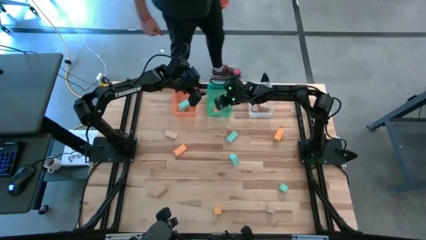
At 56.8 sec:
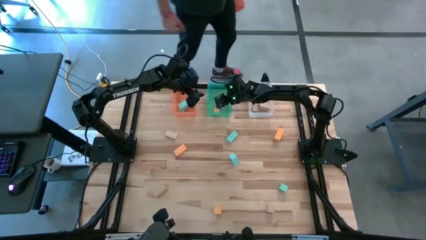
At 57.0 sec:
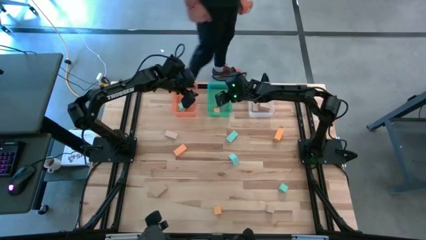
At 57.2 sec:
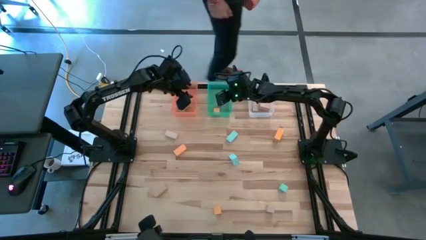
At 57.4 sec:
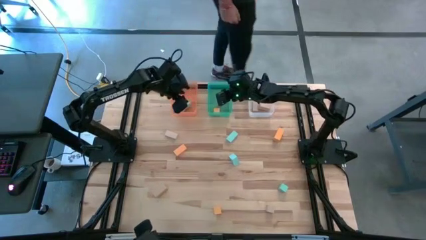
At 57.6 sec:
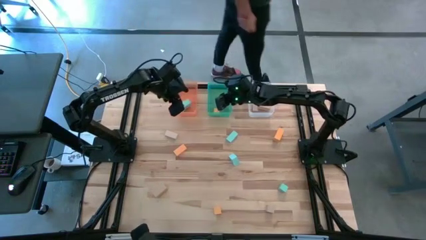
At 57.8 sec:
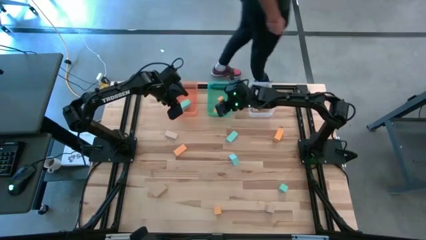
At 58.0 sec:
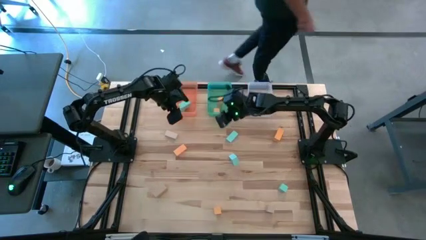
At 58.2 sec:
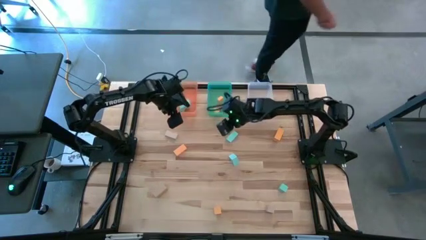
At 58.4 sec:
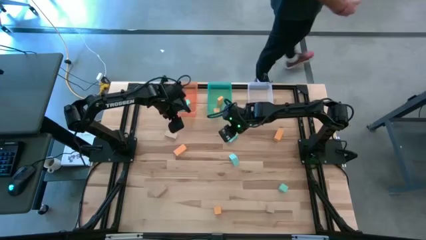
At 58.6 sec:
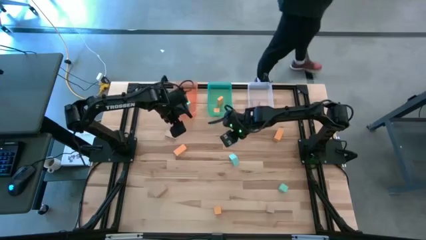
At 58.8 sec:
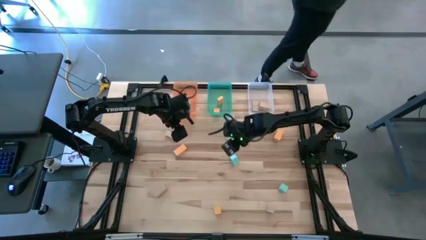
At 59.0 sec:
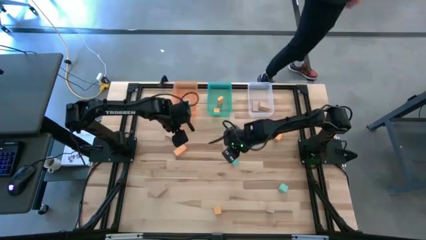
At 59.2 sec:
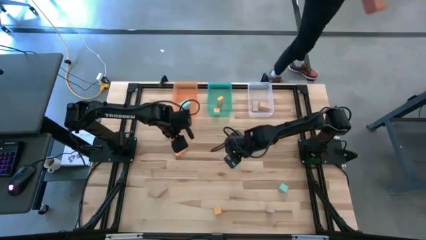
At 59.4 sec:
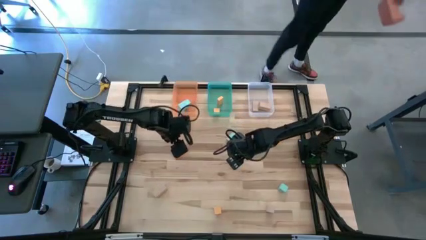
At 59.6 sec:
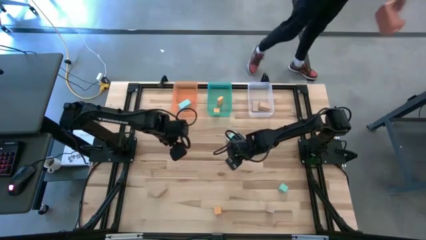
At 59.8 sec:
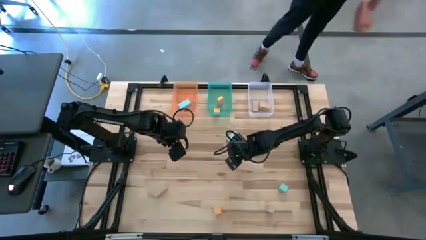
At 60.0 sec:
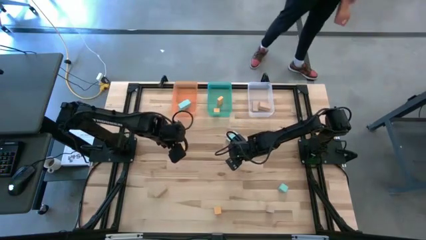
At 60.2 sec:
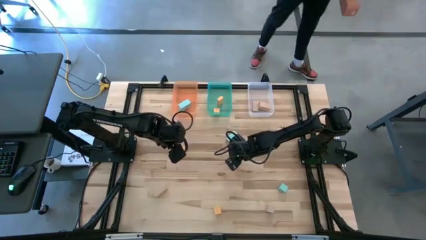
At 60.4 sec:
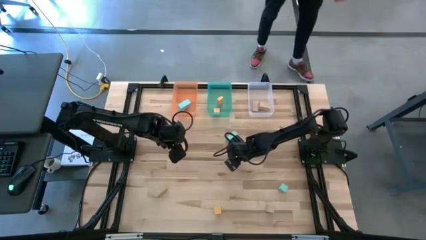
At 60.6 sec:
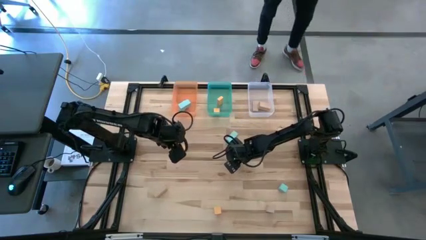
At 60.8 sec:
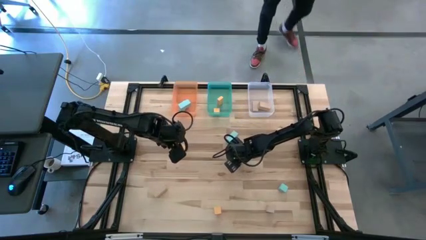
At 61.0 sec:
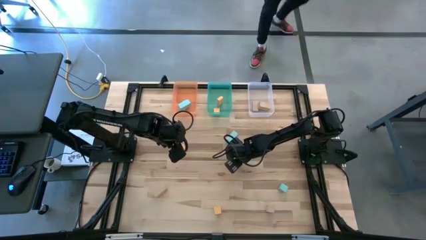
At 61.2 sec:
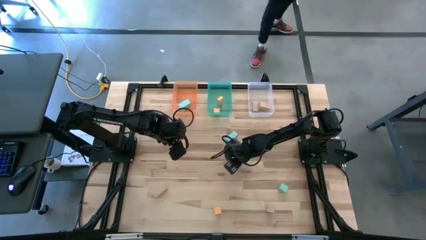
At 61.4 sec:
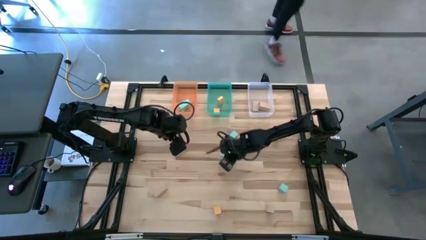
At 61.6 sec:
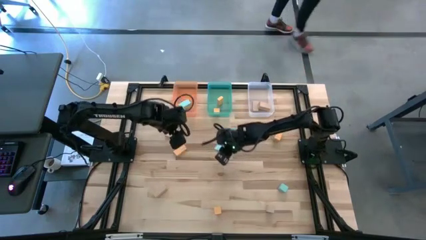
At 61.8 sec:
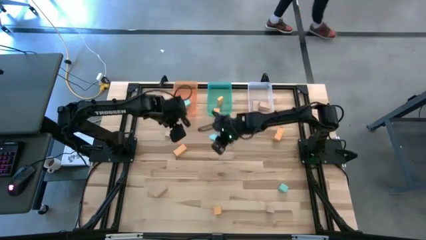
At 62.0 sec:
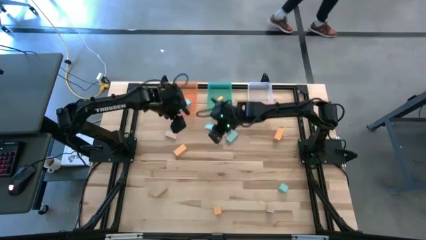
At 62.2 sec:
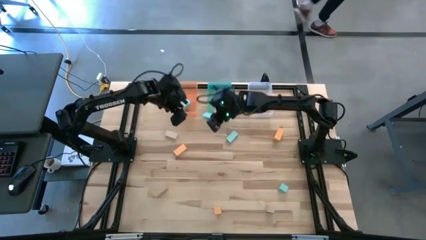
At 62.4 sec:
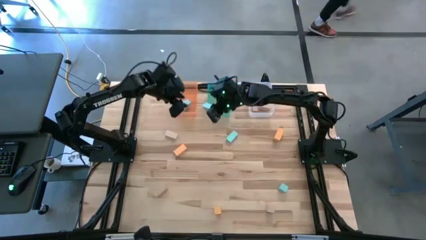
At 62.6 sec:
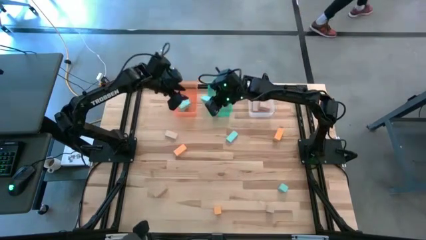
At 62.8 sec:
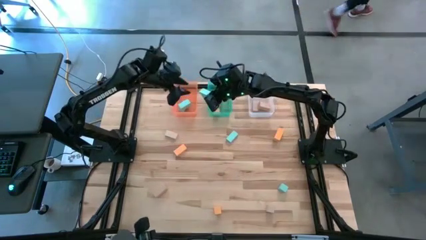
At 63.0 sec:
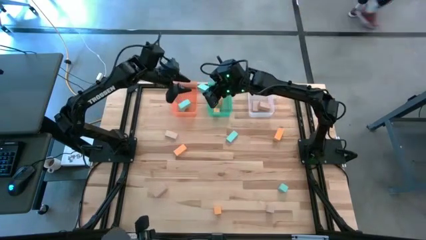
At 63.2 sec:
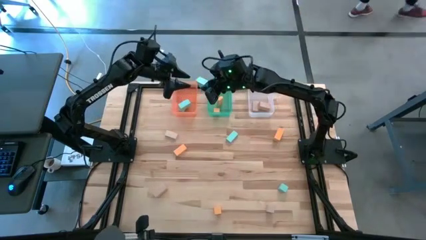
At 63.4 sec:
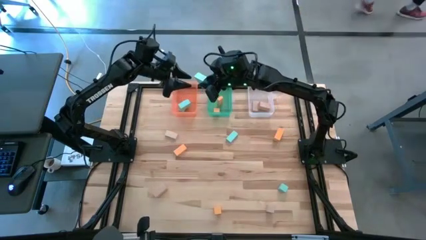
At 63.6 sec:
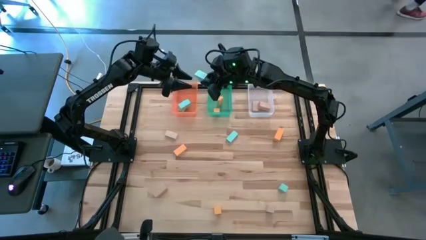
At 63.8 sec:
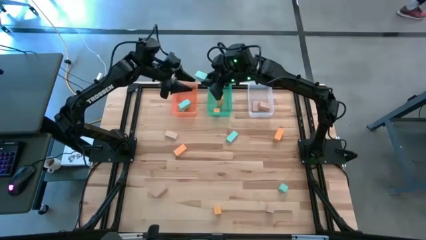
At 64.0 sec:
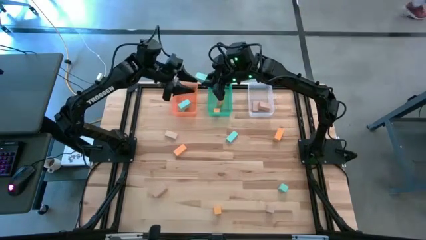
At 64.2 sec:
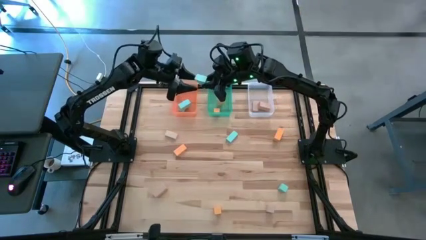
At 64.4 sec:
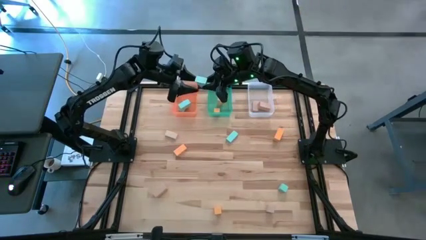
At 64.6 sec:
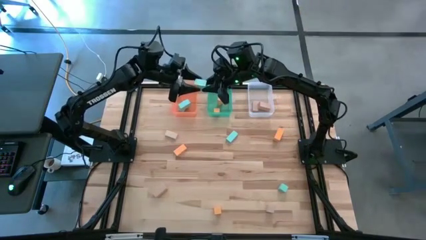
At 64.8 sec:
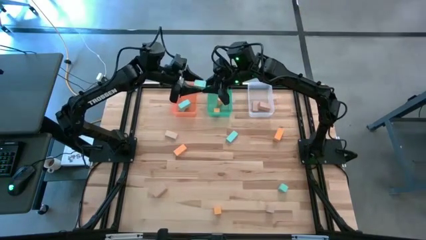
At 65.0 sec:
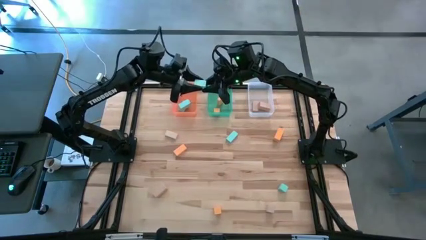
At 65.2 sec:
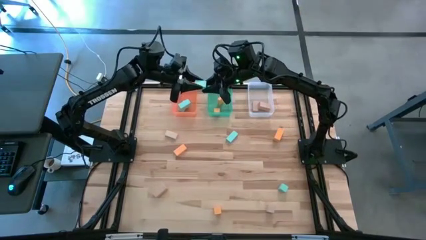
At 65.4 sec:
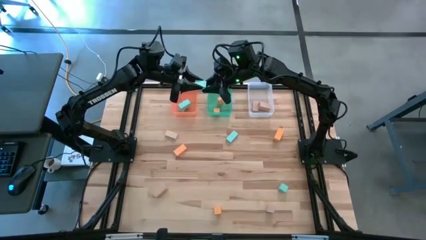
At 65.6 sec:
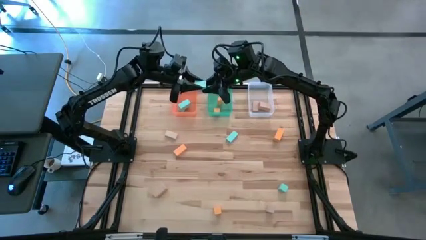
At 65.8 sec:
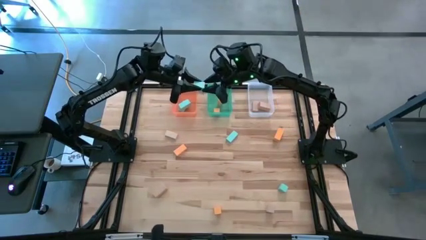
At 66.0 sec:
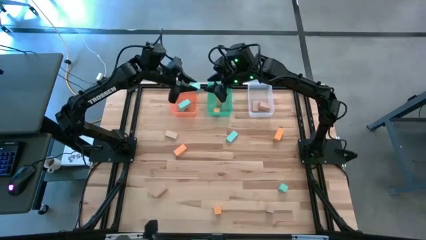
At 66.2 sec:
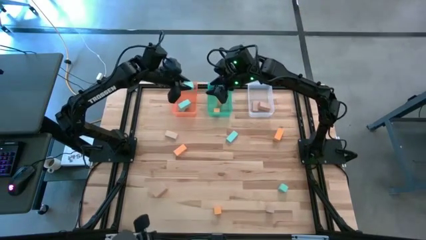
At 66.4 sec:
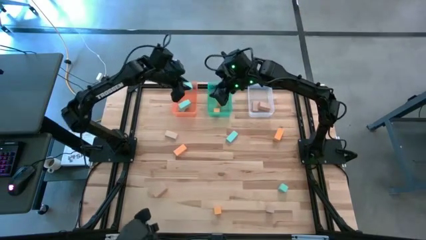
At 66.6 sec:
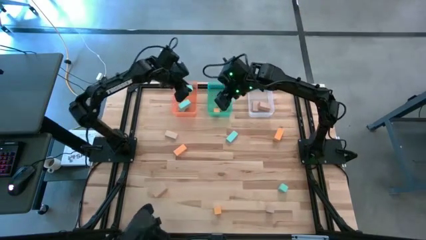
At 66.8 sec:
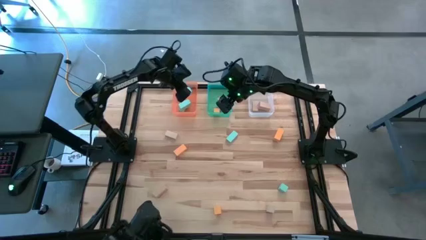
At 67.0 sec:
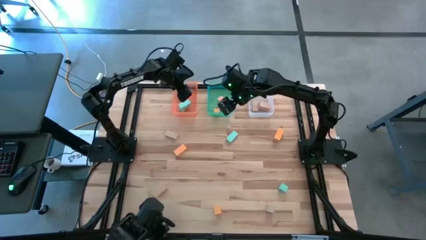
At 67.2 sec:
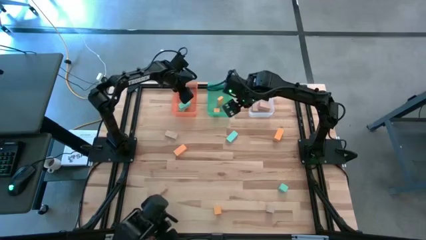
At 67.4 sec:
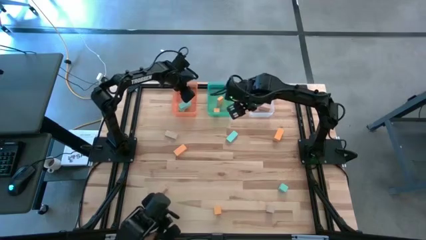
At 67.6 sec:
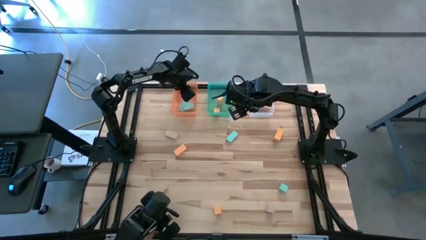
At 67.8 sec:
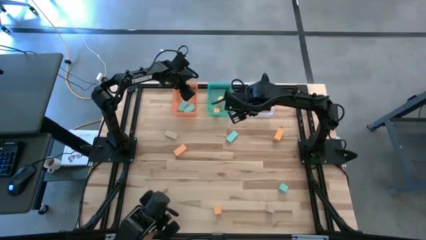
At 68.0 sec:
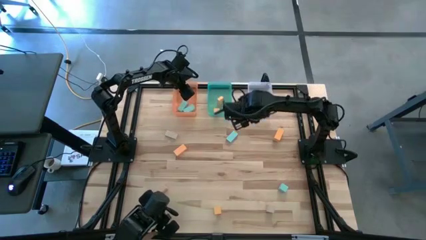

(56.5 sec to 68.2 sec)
Task: Sort & place blocks by color
Put the light blue block into the orange bin

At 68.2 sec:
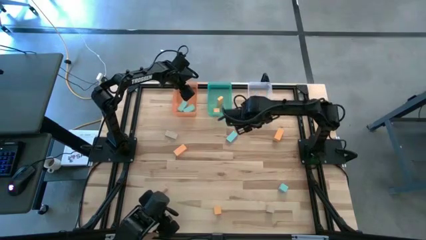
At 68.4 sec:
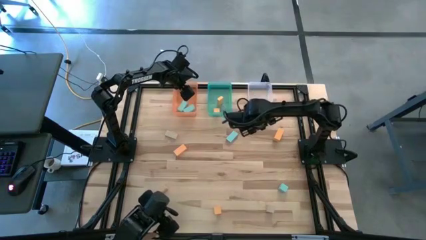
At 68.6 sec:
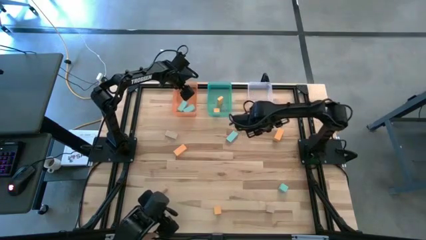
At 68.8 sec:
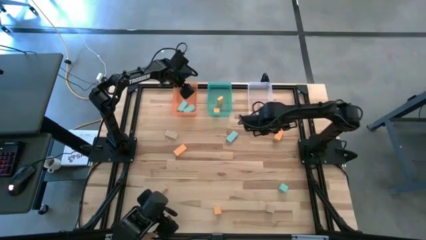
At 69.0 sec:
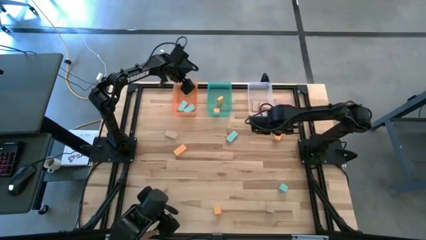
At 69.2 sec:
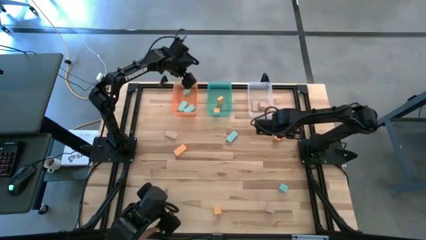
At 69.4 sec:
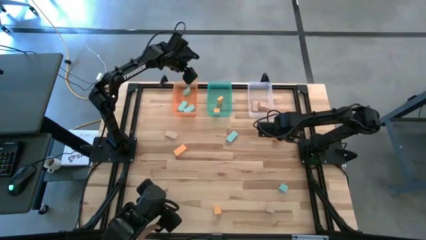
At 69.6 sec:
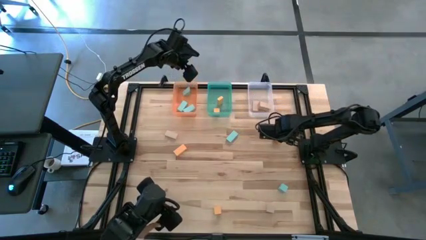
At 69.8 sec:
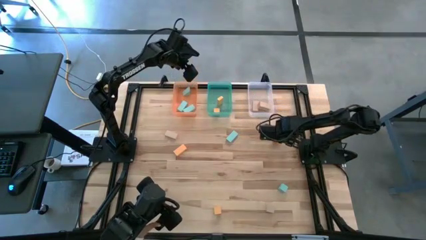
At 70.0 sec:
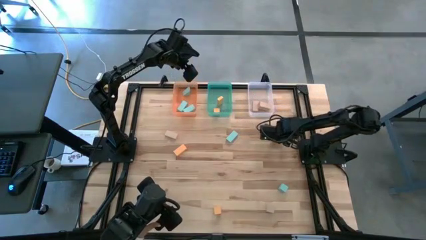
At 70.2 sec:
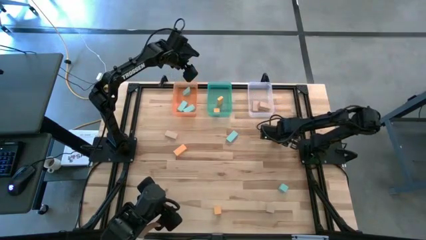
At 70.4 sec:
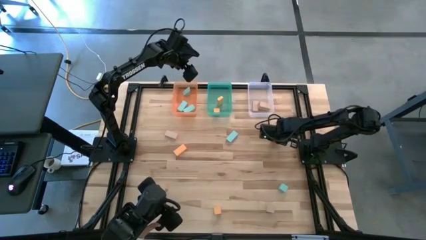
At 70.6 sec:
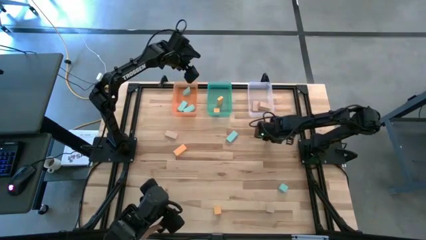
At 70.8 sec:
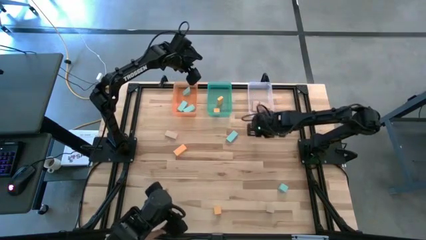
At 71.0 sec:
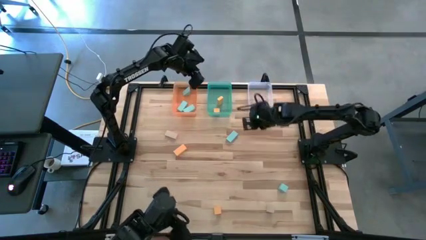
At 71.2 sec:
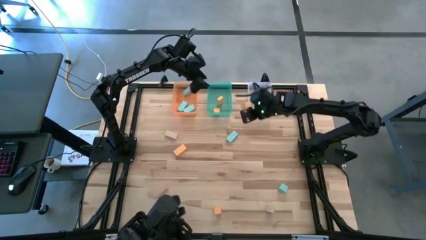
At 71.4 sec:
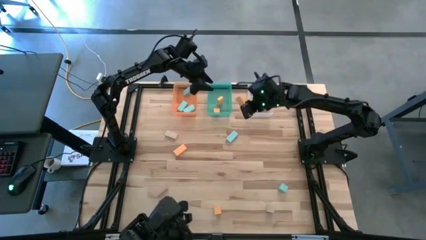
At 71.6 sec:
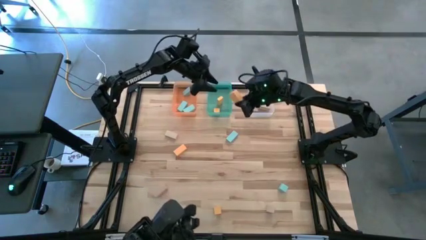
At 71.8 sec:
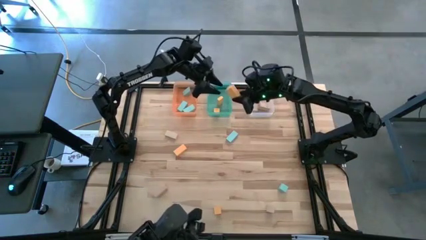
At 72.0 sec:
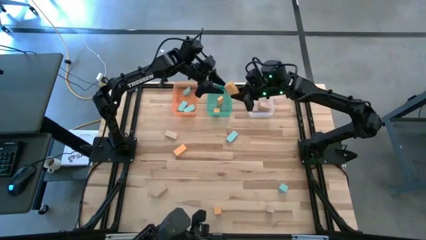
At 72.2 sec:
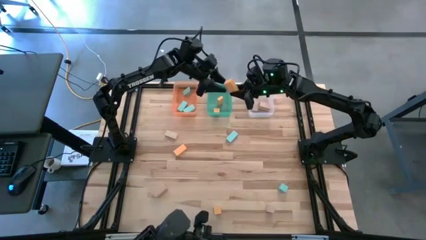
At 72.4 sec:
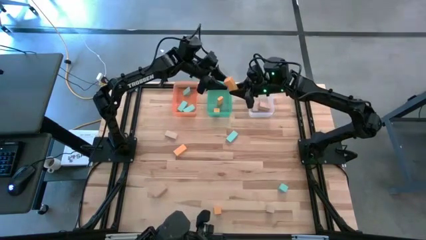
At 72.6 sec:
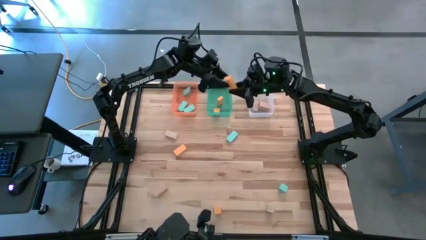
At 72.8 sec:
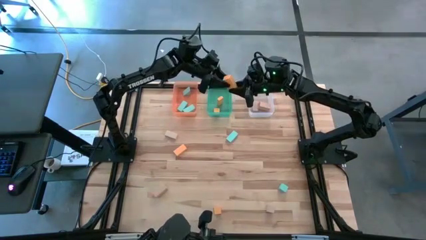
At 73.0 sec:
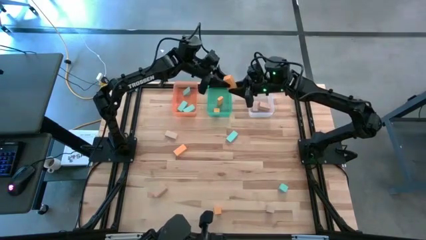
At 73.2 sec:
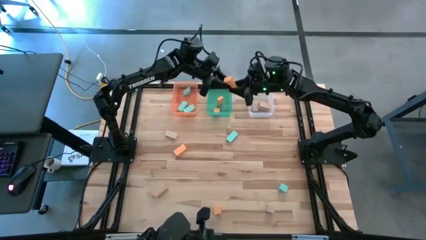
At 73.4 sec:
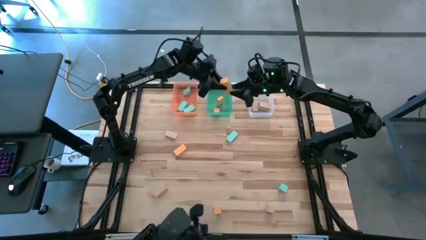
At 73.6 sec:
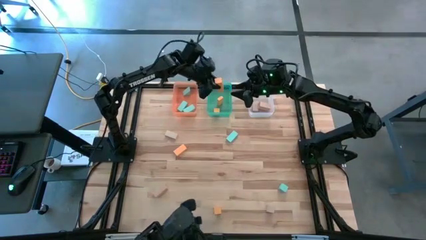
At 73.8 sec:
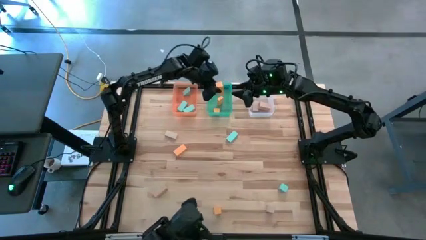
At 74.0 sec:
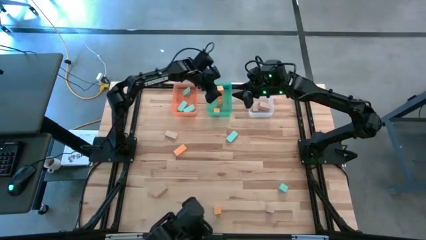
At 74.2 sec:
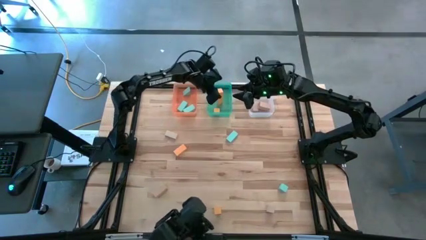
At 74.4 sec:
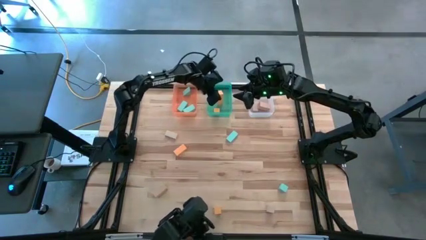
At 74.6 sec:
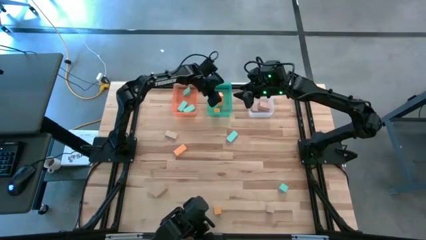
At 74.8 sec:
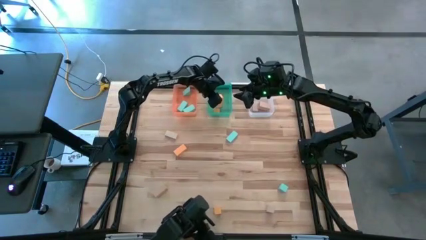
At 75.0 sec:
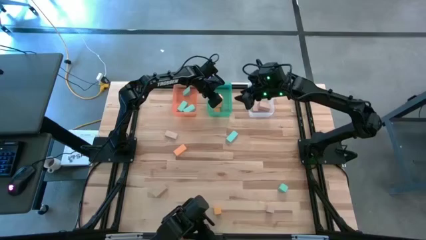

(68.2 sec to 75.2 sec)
Put the yellow block into the green bin
